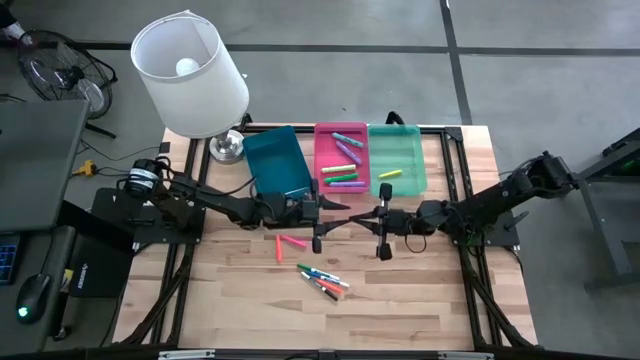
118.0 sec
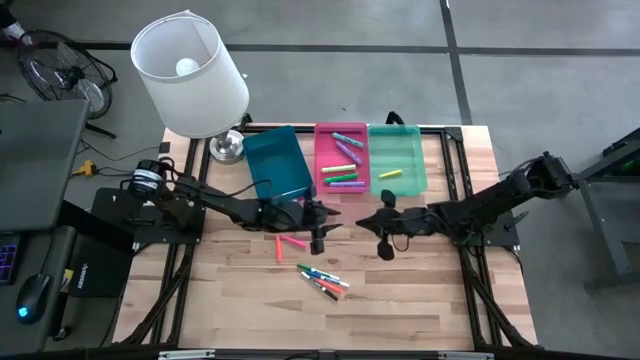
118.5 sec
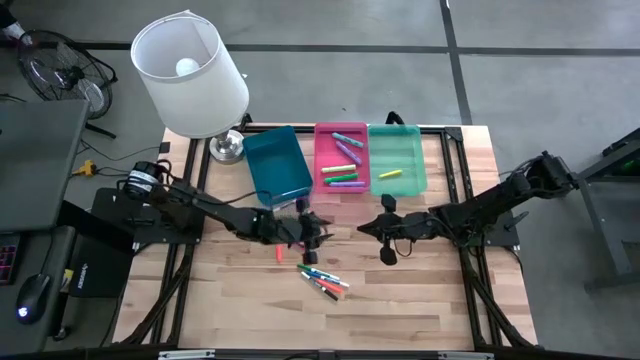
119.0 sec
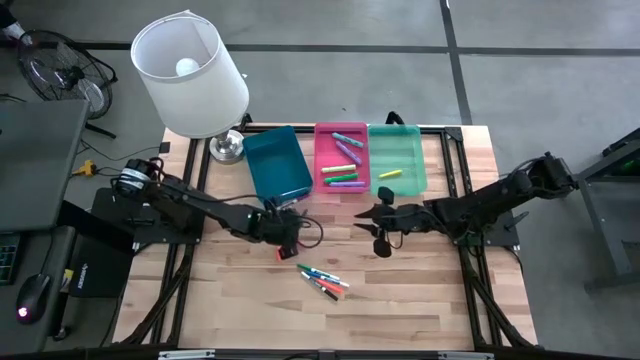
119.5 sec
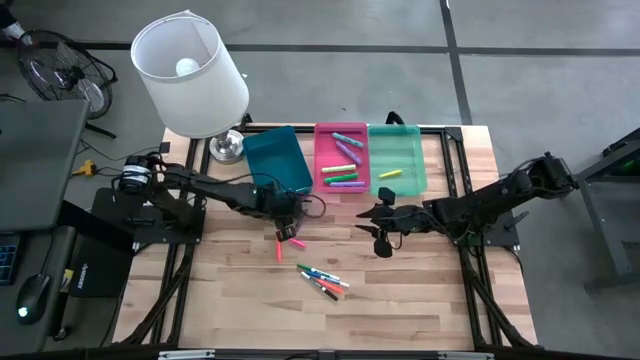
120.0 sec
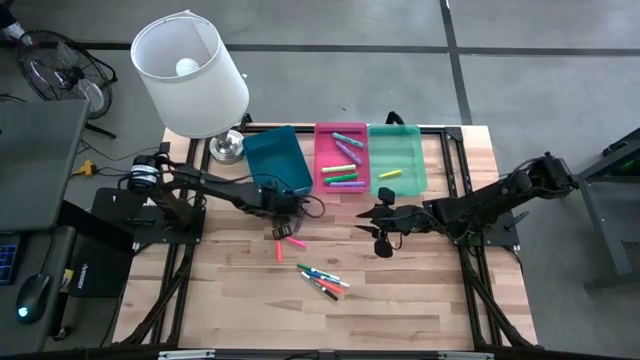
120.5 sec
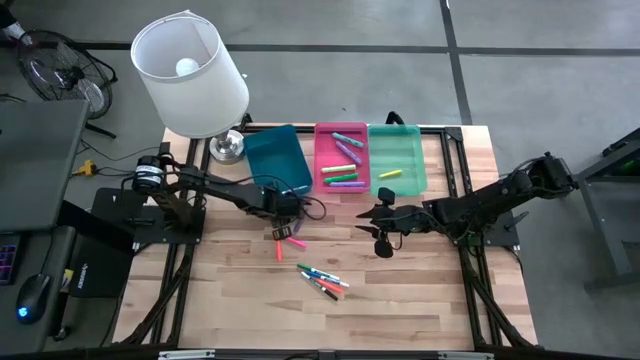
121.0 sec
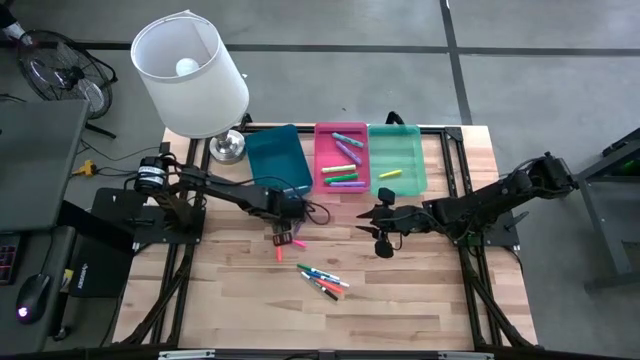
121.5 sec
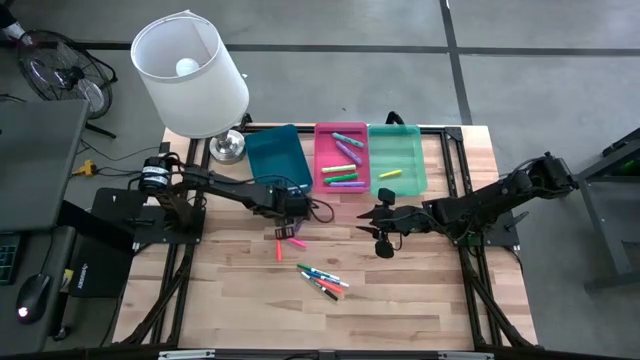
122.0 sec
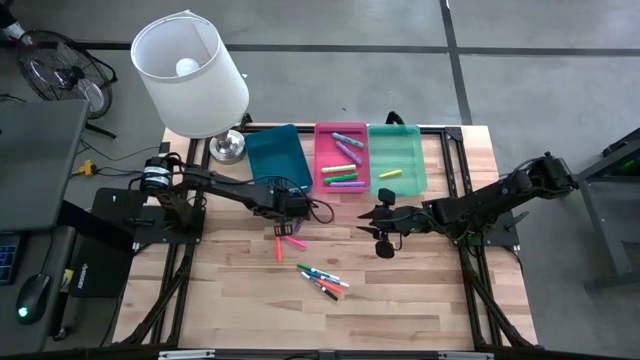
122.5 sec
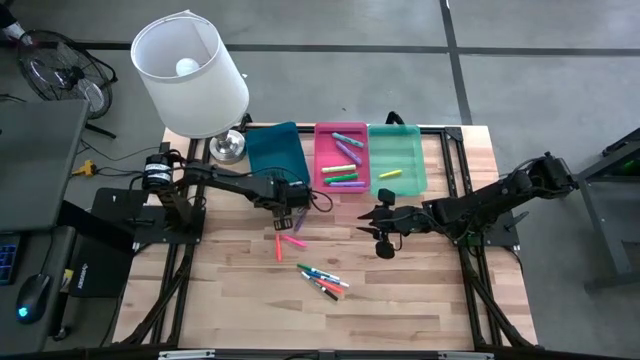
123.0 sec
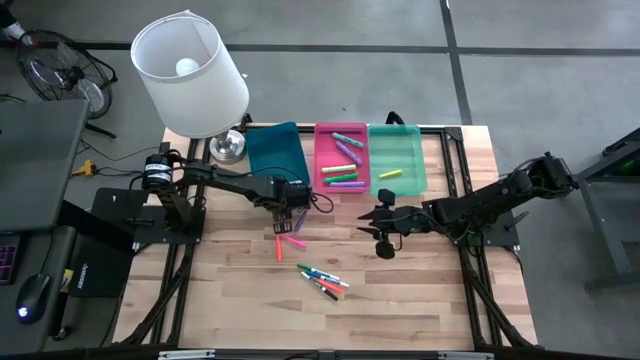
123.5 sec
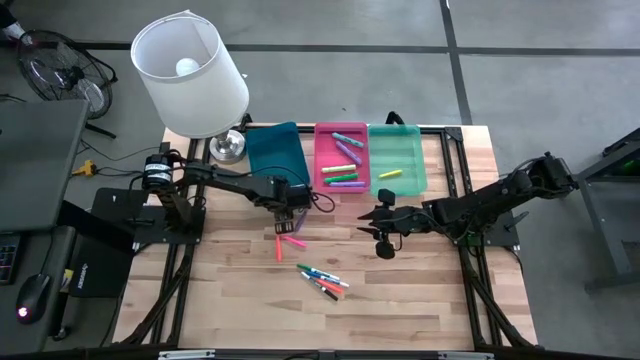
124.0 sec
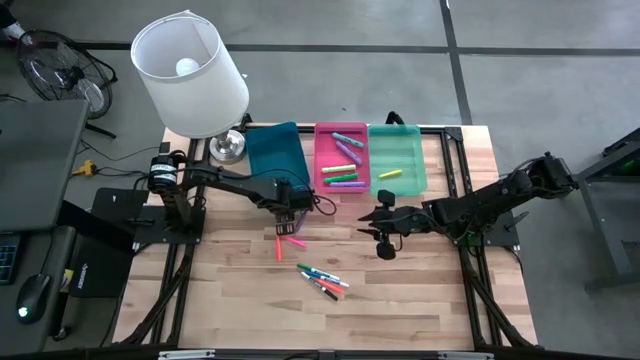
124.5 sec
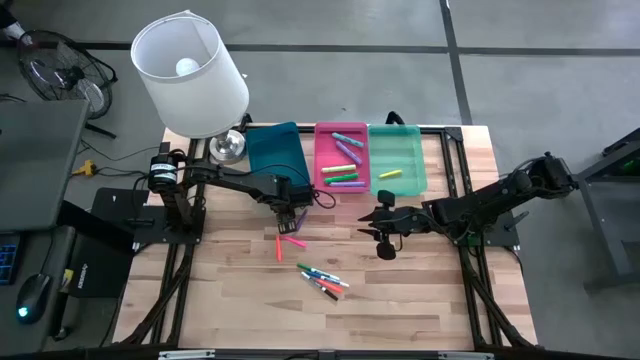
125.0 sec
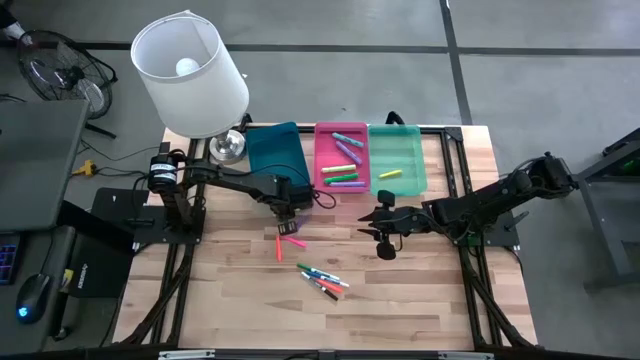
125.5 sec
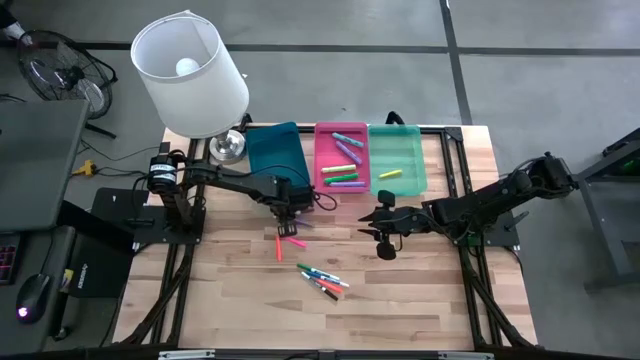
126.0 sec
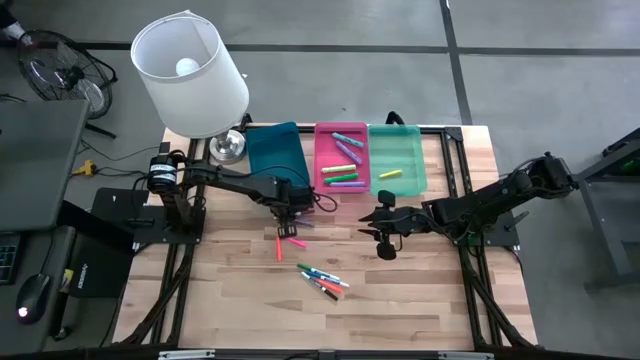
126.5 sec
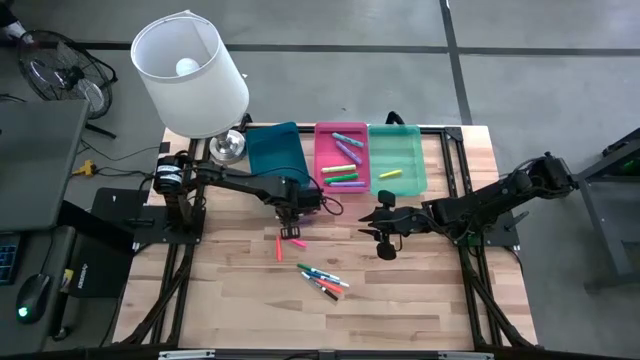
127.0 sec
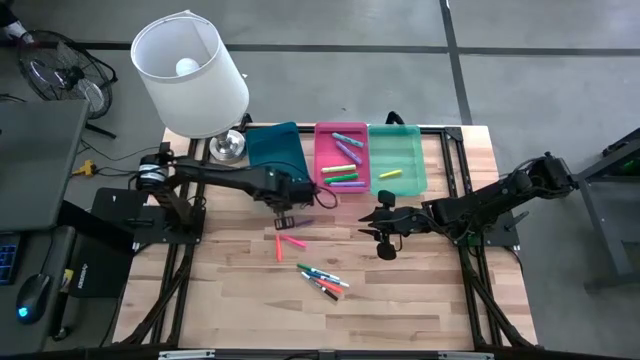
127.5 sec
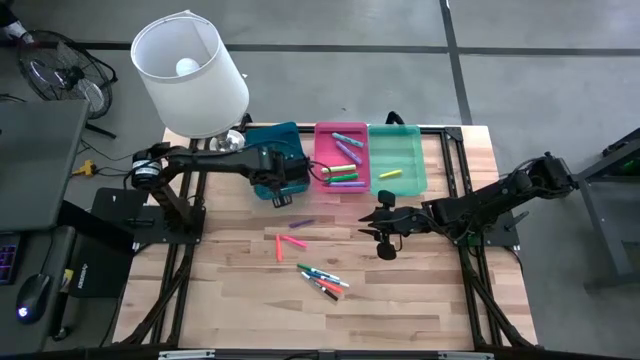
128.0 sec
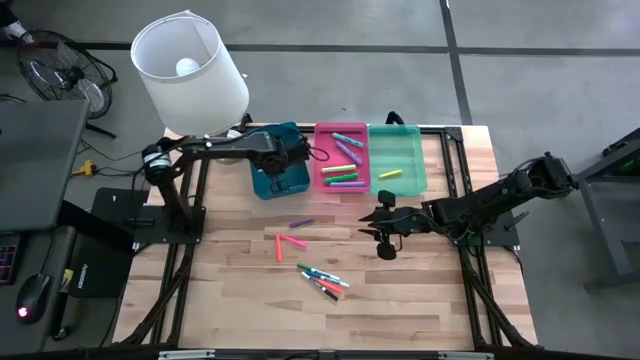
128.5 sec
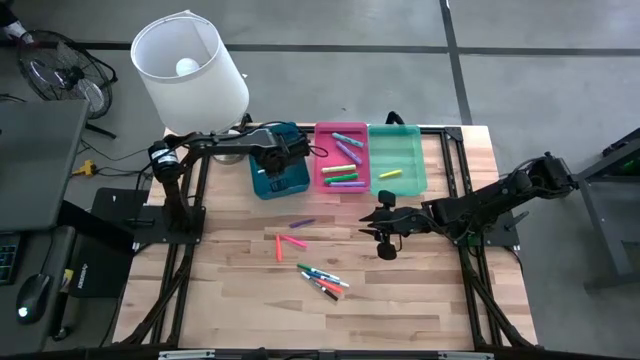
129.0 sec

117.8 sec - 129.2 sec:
Task: Pick & Place Markers
Put the dark pink dry erase marker into the dark blue bin

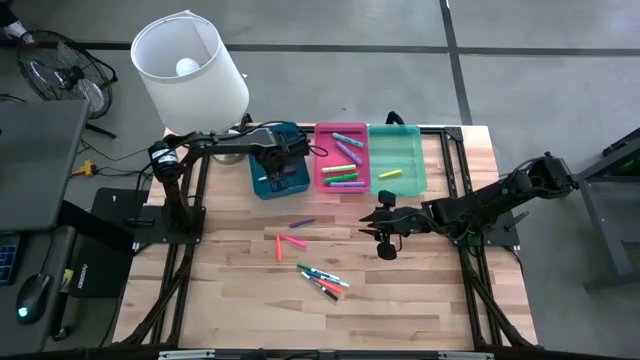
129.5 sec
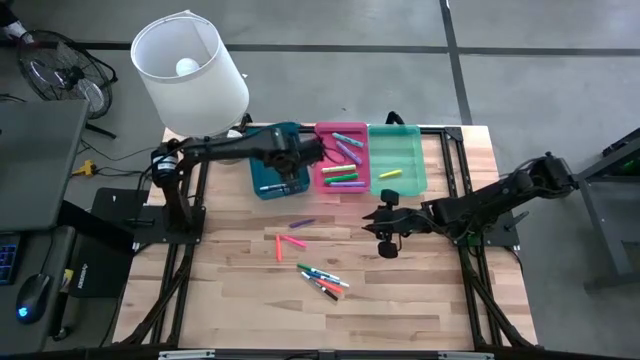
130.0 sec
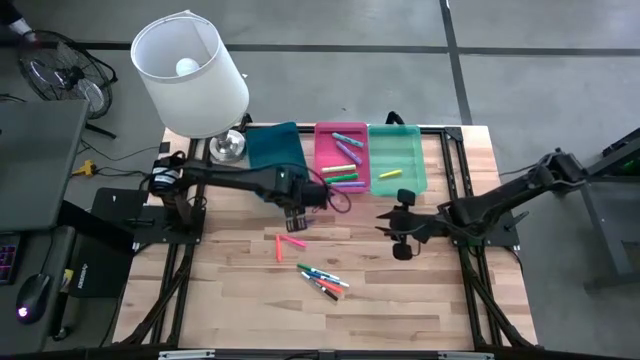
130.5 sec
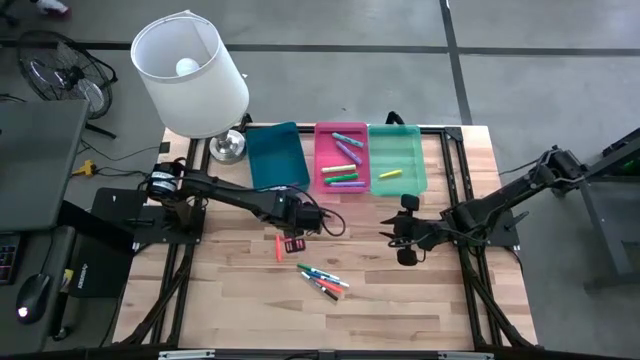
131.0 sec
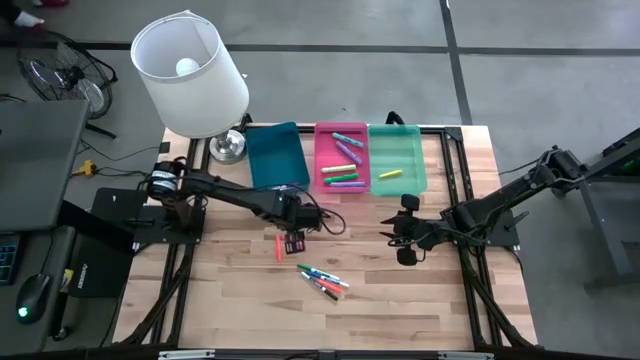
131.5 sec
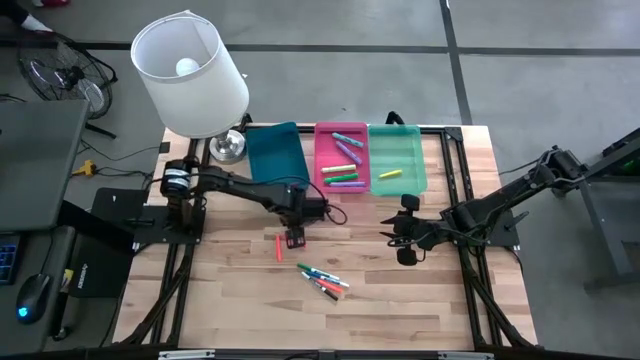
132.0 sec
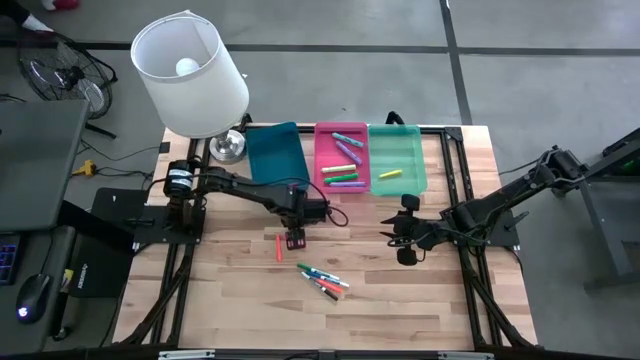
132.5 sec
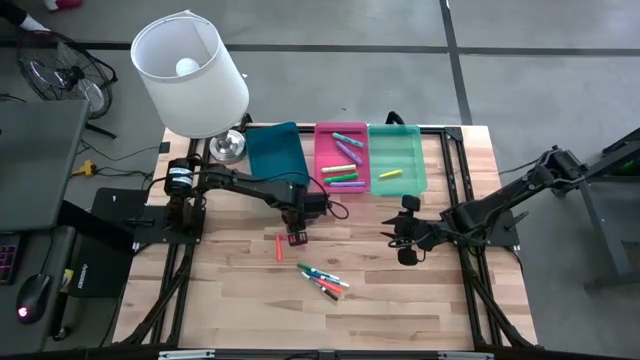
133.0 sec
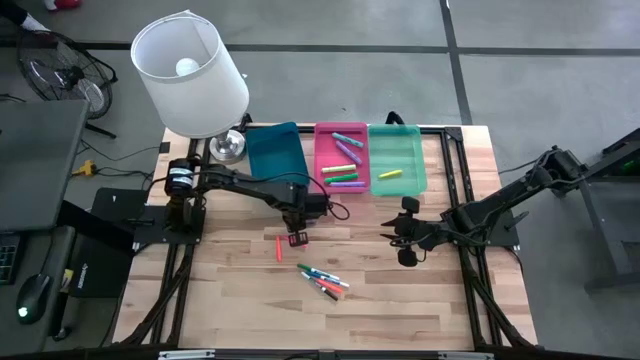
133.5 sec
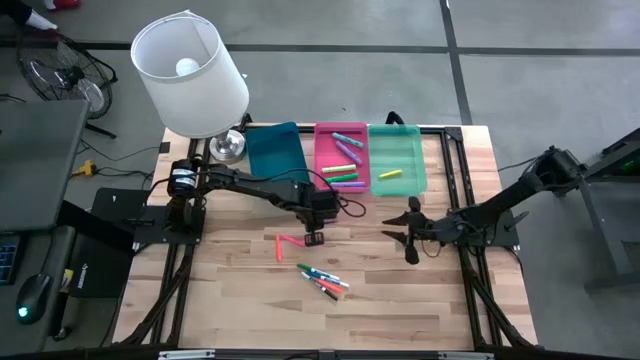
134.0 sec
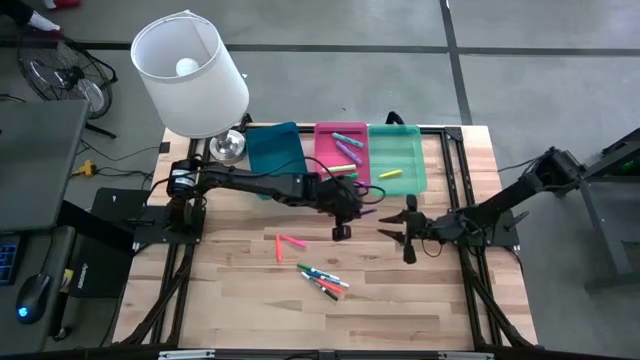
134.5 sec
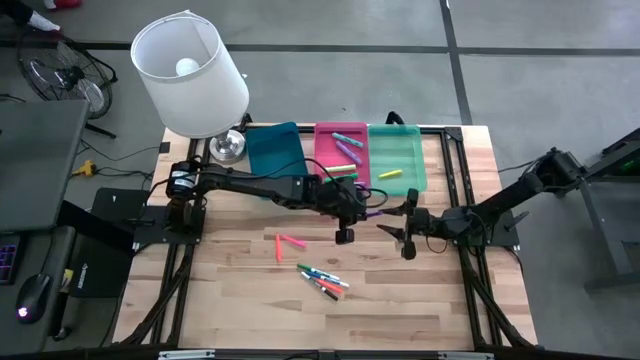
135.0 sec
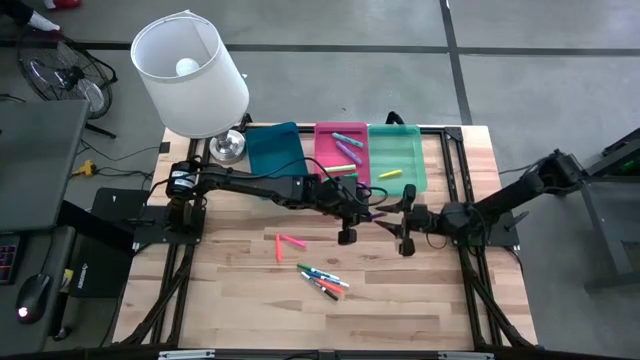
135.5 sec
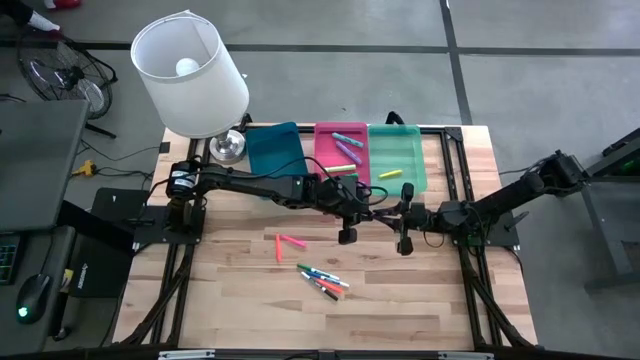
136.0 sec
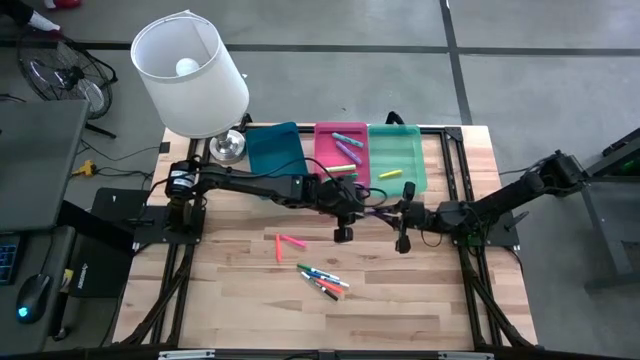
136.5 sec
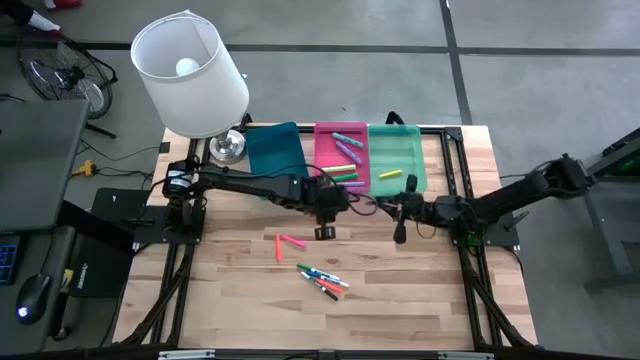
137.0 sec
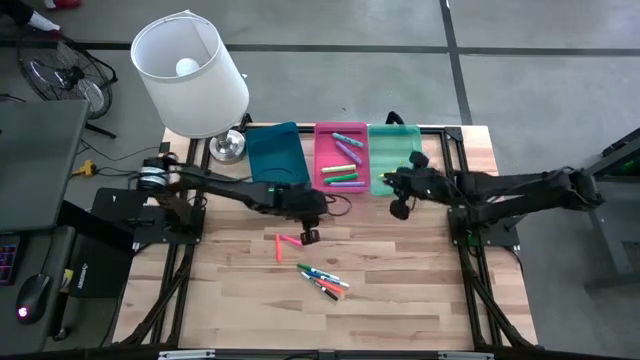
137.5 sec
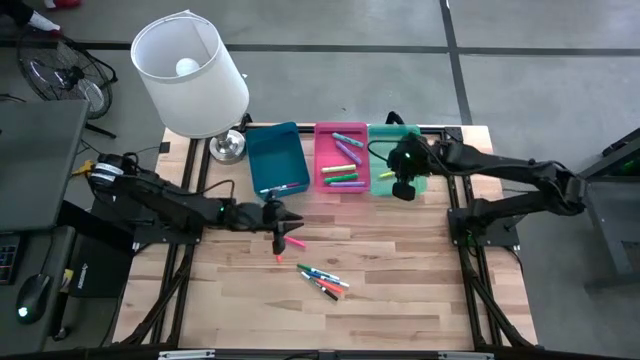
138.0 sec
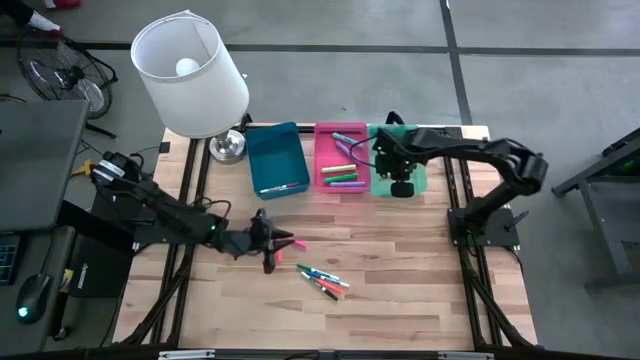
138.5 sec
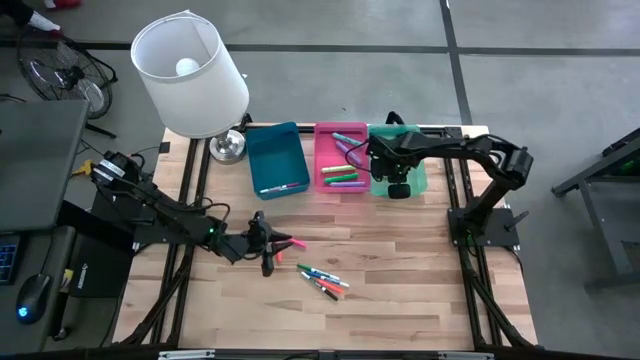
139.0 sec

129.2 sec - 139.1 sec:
Put the purple pen into the green bin
